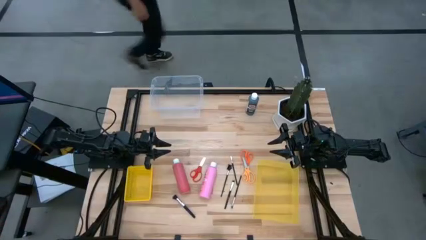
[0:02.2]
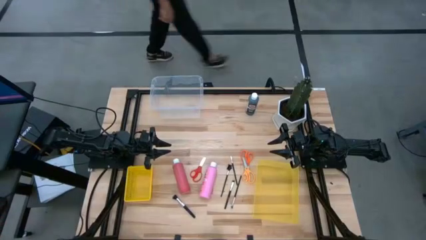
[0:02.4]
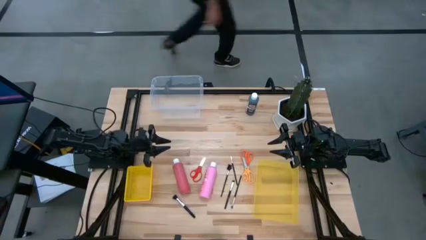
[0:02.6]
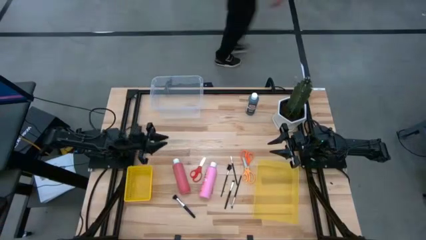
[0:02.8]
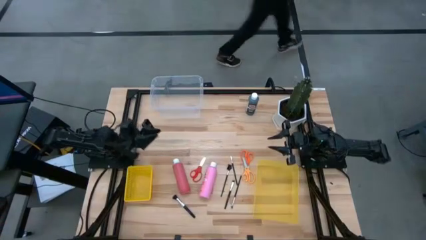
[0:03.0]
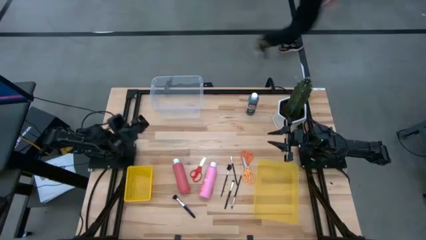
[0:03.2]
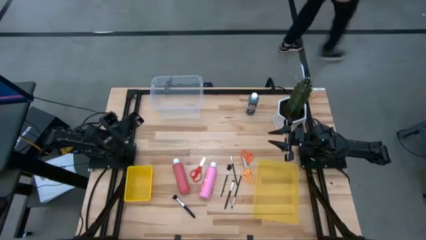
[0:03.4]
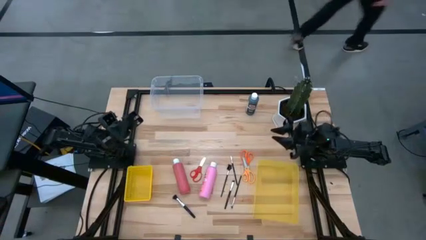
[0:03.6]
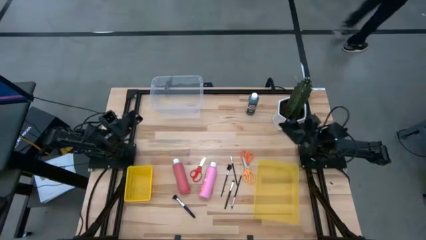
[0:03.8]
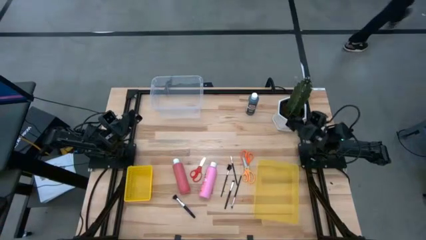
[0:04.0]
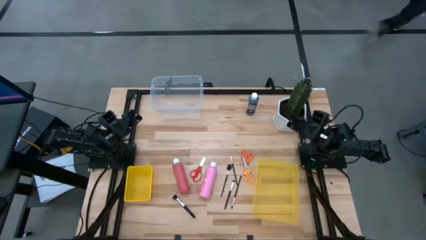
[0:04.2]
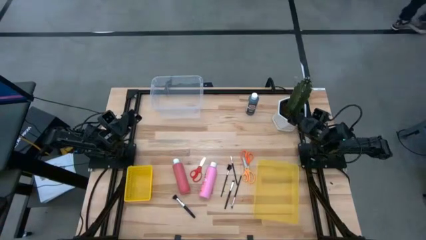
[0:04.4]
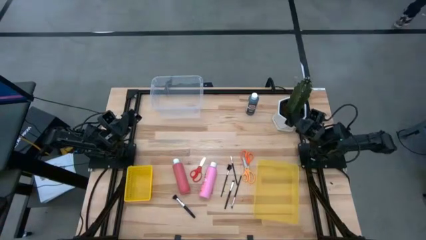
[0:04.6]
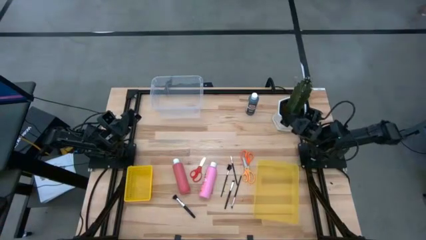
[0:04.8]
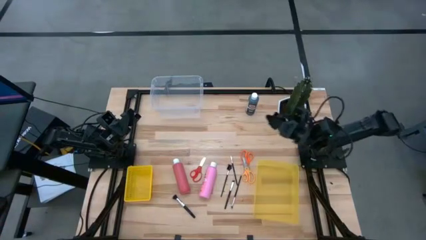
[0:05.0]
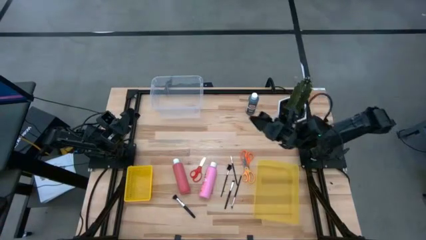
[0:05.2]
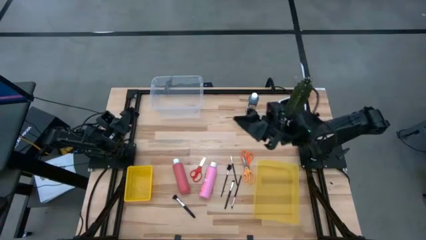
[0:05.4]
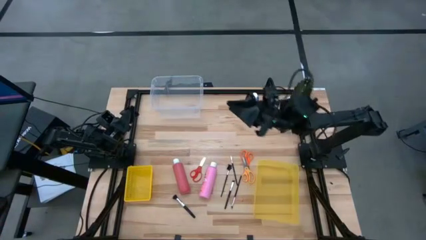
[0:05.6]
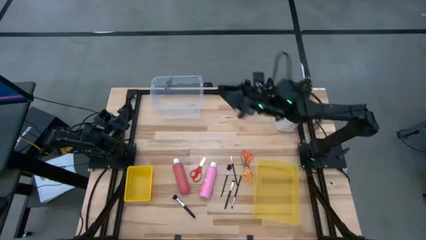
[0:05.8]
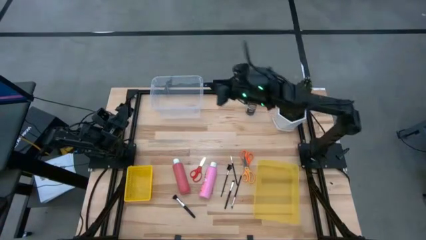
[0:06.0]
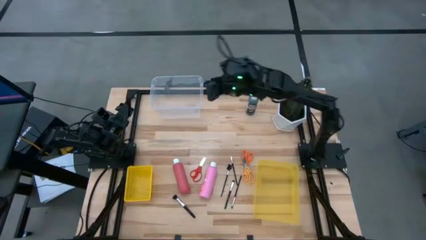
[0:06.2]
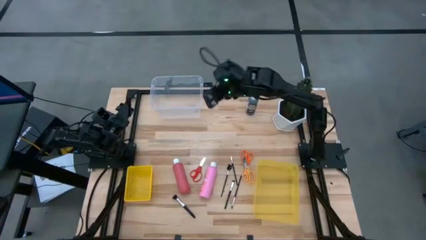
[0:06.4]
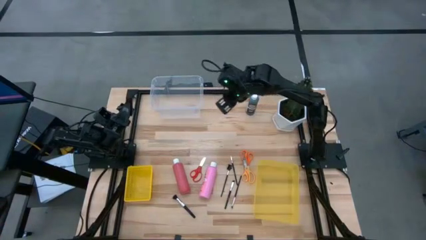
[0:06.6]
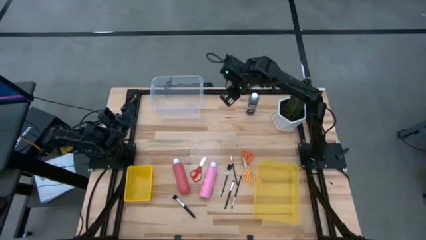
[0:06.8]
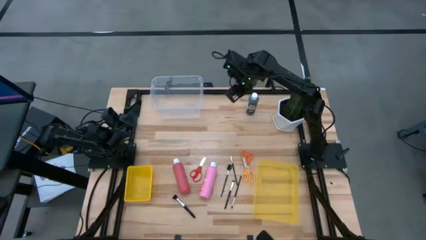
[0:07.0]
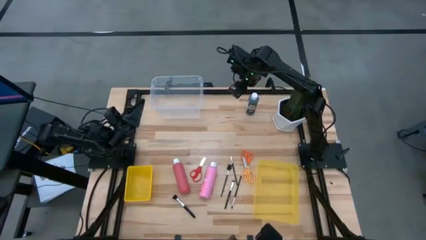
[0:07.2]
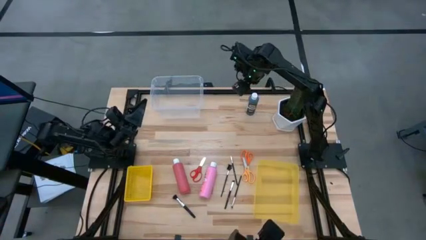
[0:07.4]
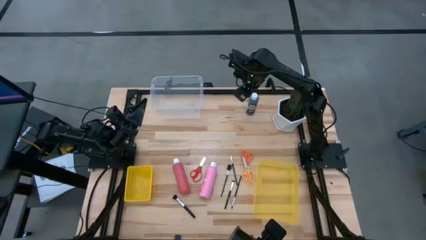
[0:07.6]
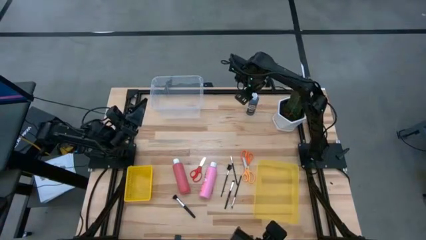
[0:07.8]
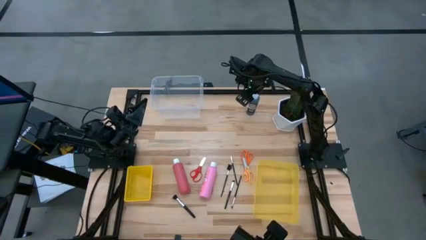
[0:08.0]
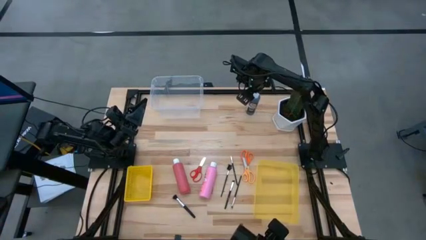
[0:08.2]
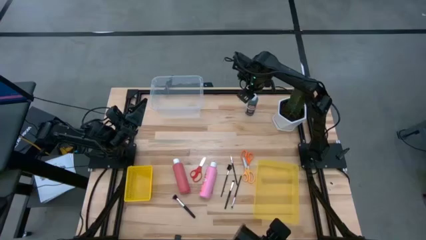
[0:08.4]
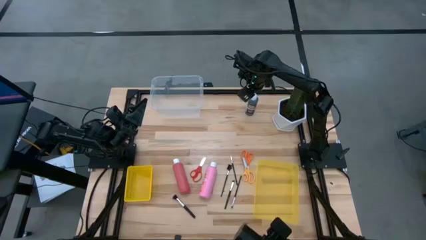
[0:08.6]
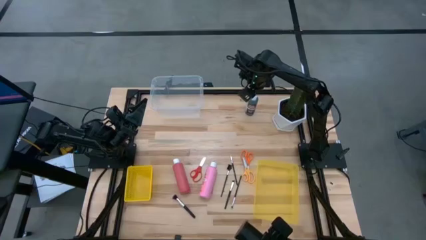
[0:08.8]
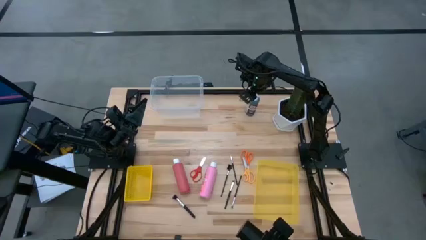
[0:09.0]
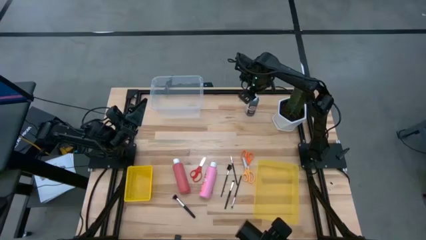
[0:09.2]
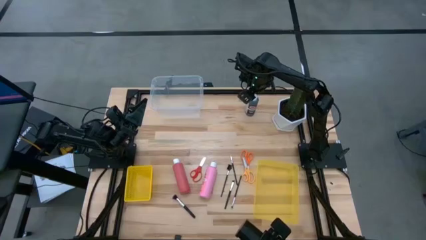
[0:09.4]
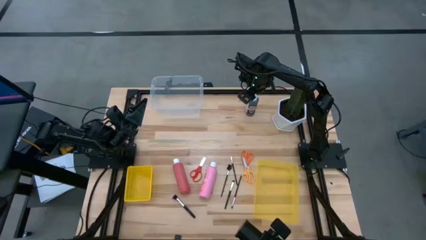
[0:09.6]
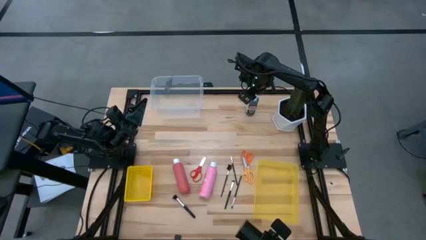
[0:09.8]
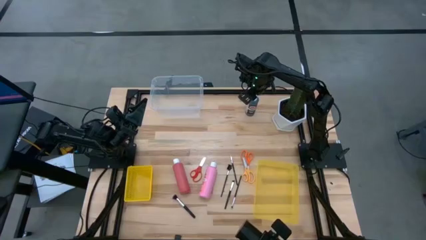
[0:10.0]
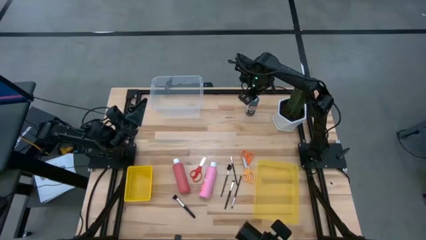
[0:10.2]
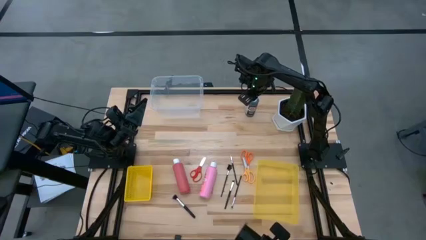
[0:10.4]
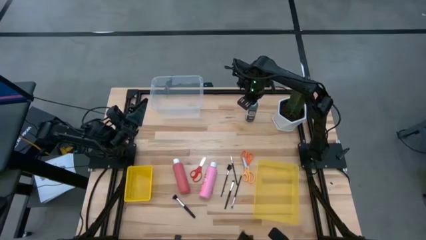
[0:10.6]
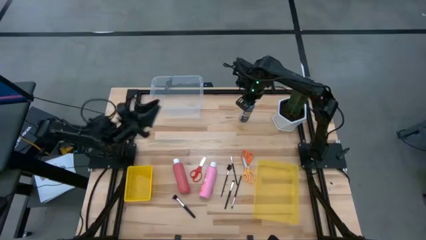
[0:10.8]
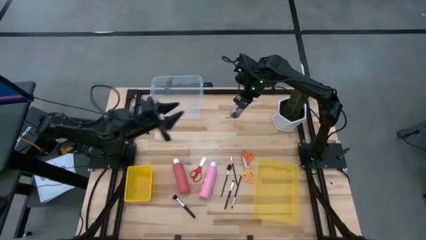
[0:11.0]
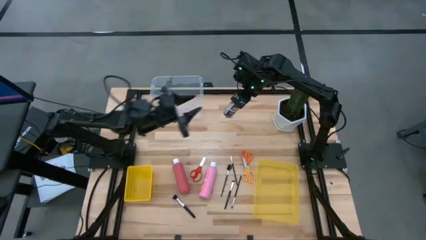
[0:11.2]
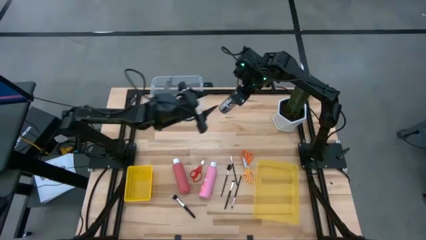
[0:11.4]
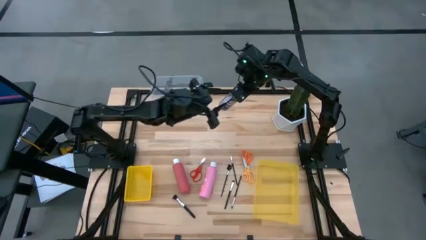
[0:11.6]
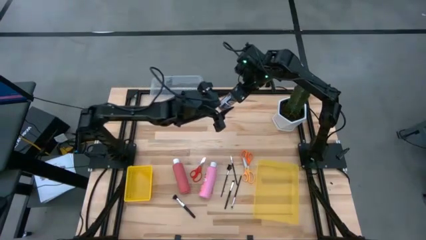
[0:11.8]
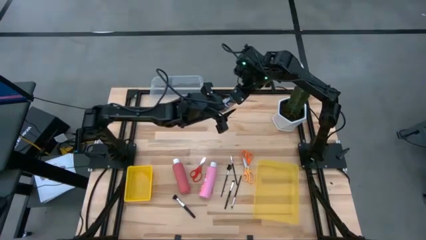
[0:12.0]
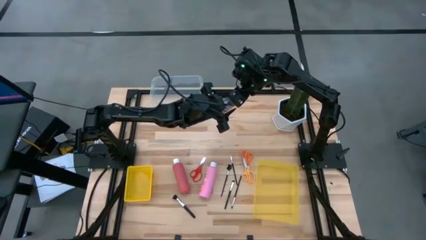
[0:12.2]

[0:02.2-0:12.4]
Task: Pick & Place Paint Supplies
Put the black paint bottle into the transparent bin

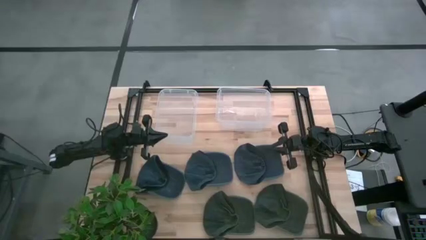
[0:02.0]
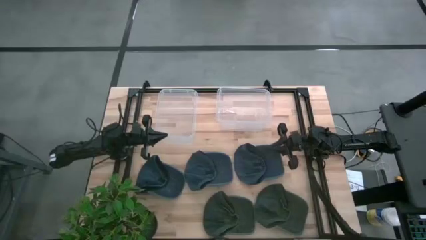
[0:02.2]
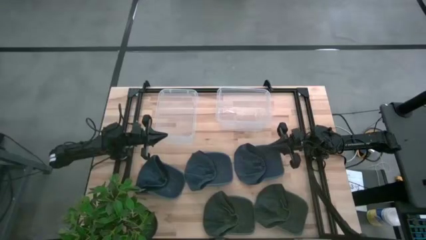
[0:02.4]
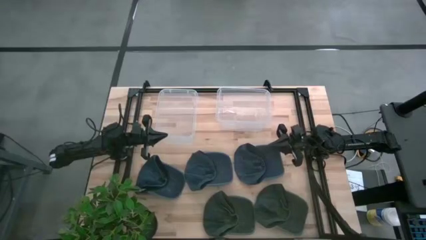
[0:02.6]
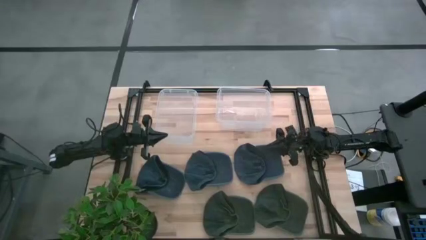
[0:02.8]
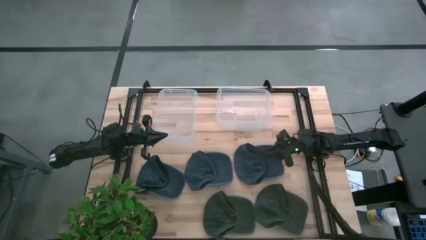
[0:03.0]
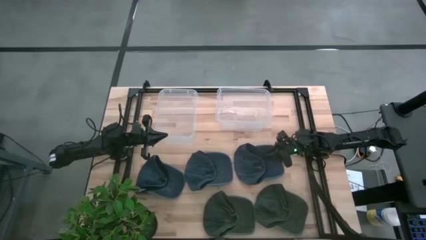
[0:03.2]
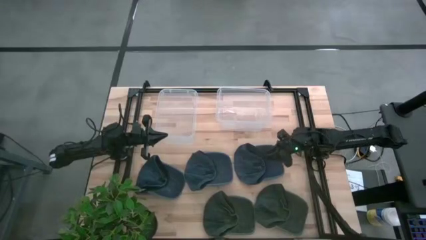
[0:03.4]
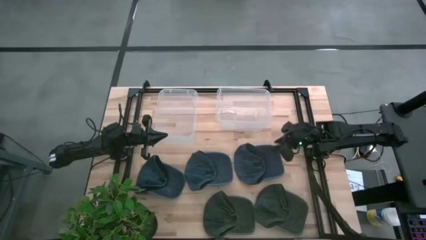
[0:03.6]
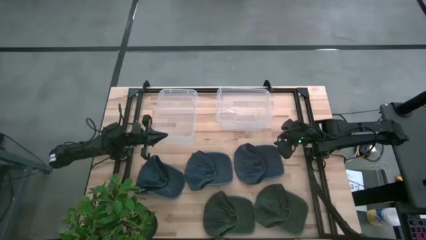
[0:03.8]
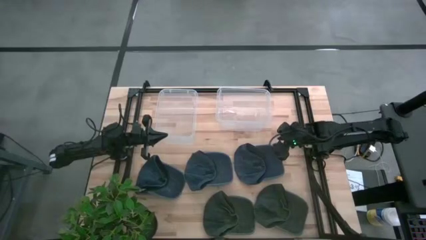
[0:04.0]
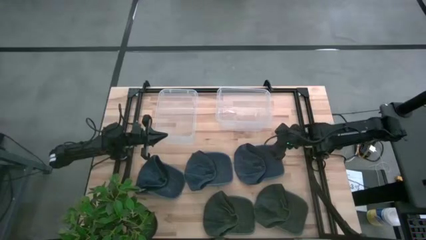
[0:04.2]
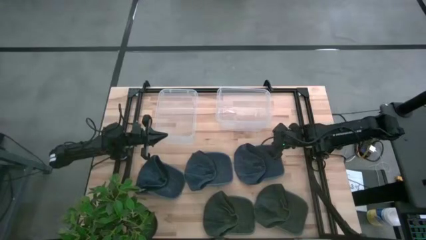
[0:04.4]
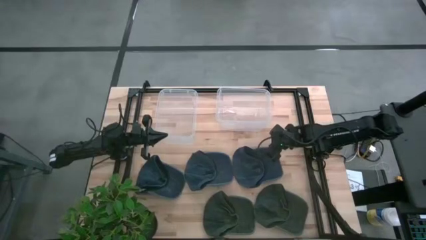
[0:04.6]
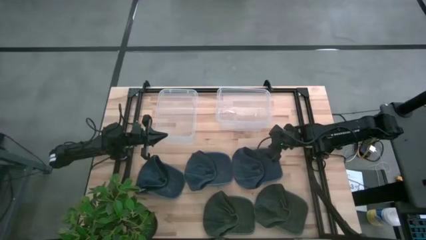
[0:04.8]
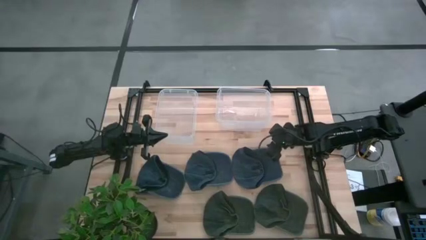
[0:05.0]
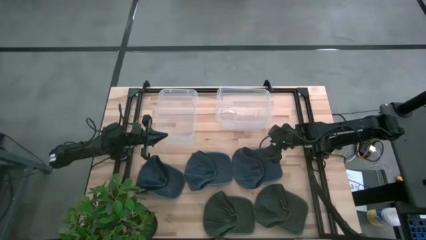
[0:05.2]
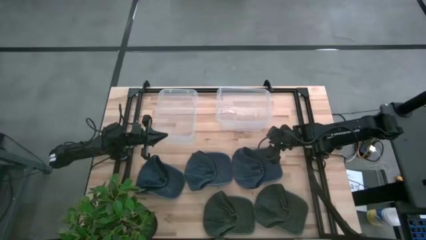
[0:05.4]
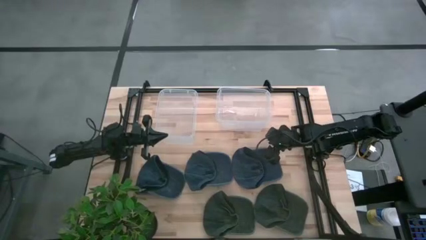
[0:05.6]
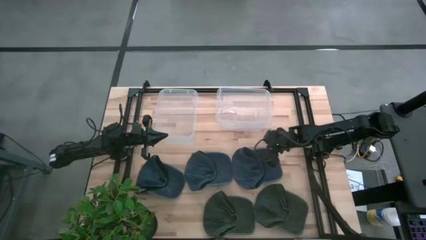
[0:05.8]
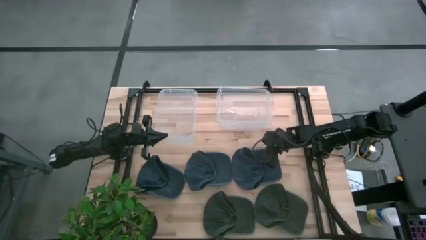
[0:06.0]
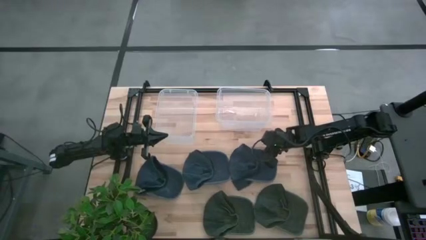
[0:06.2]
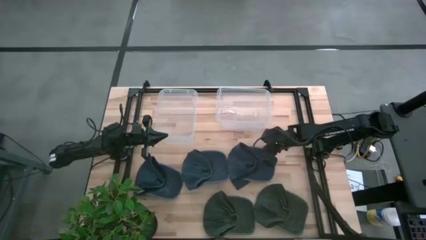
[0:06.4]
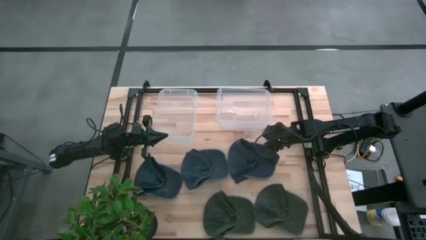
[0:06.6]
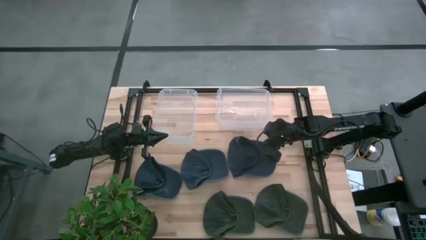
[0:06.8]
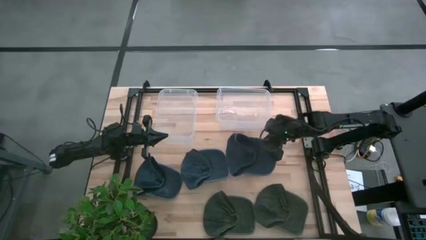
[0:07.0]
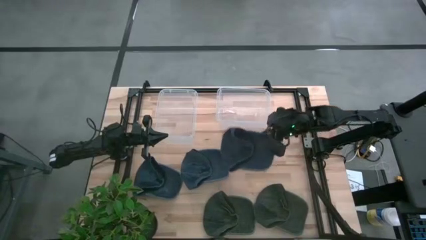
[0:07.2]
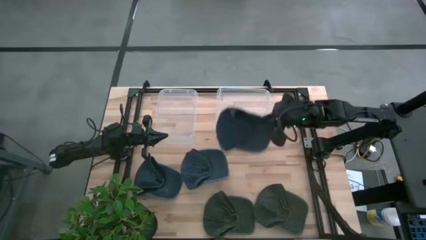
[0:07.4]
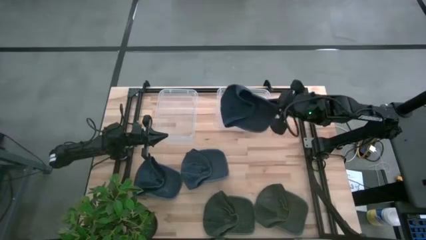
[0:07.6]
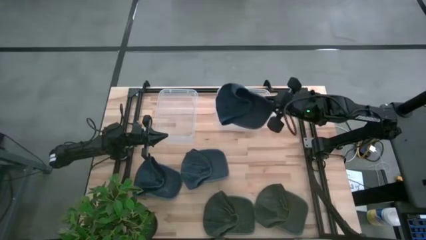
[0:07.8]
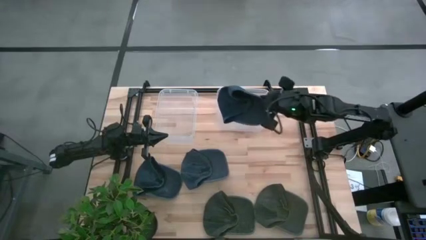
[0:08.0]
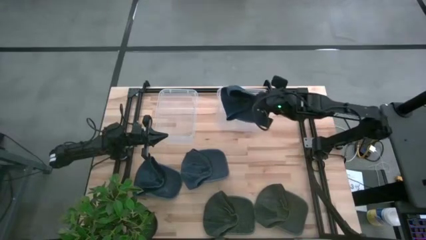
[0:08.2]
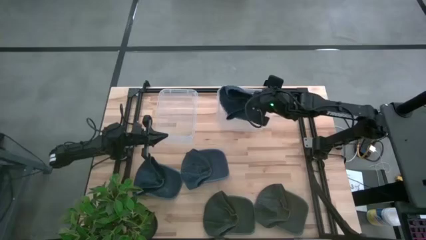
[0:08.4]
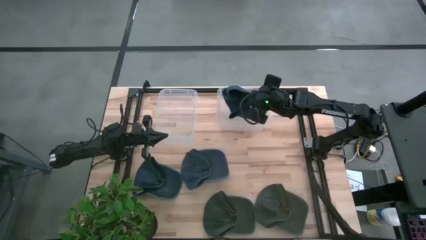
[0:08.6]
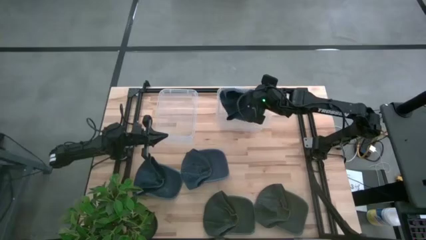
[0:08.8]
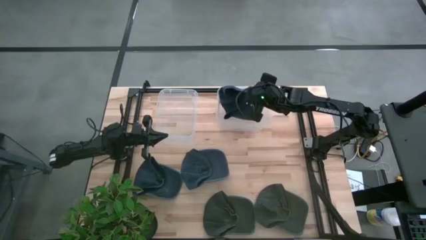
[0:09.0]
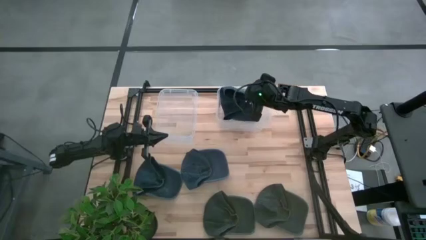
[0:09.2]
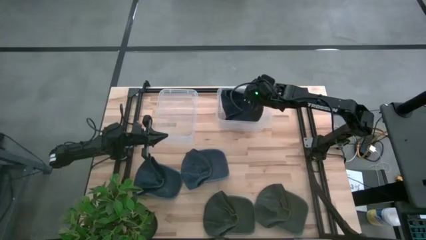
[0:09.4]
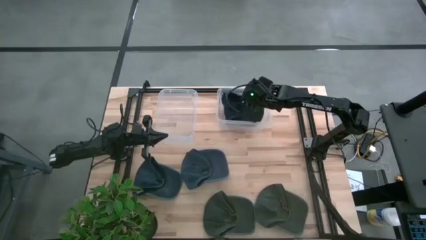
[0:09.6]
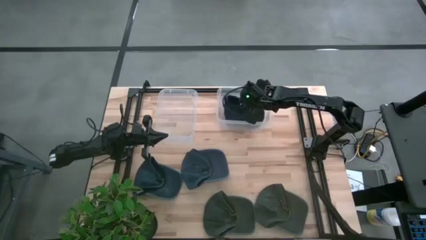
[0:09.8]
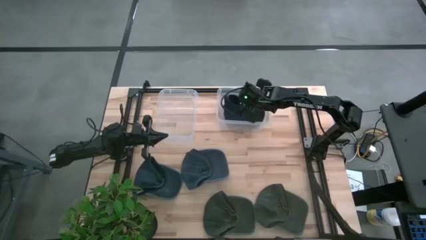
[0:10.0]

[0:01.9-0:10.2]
Task: Pick & Place hat
Put the right blue cap into the right transparent bin
